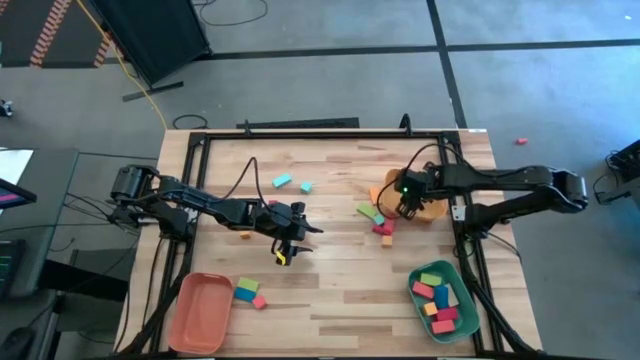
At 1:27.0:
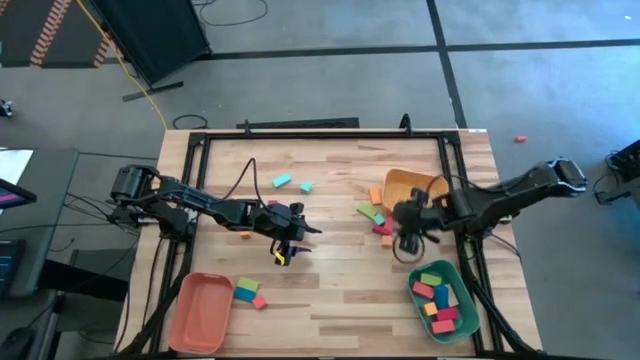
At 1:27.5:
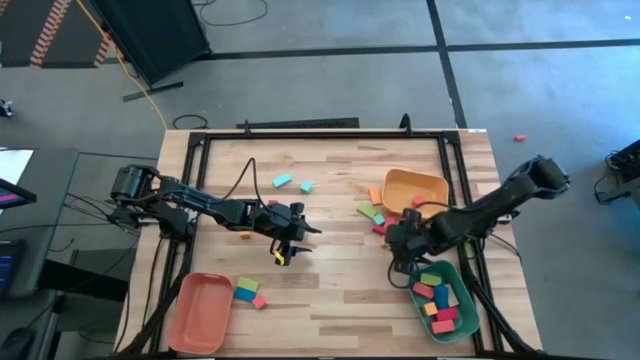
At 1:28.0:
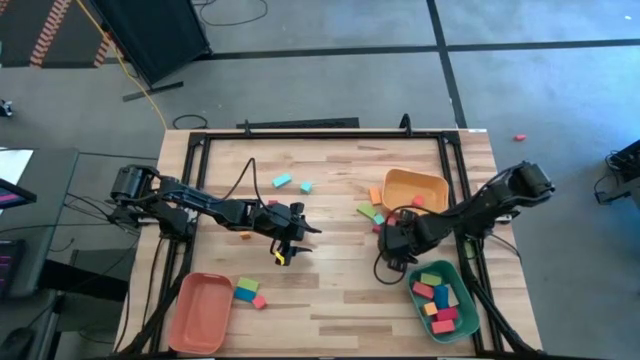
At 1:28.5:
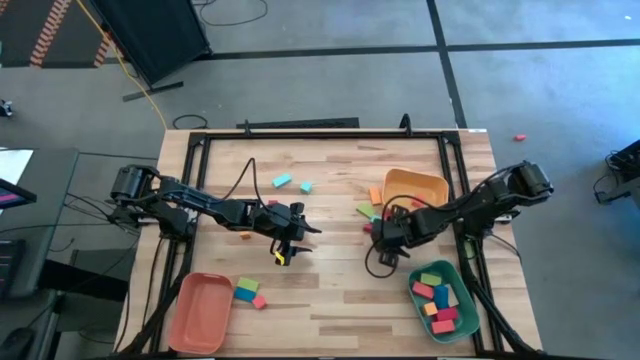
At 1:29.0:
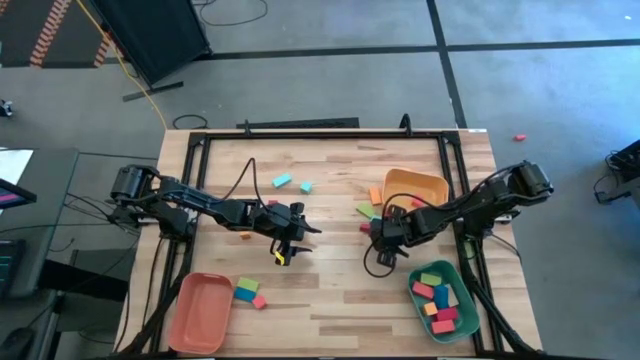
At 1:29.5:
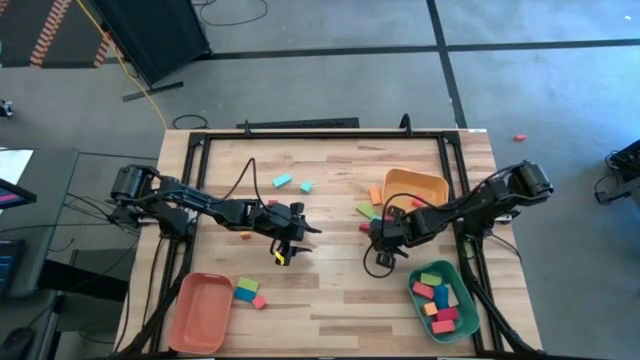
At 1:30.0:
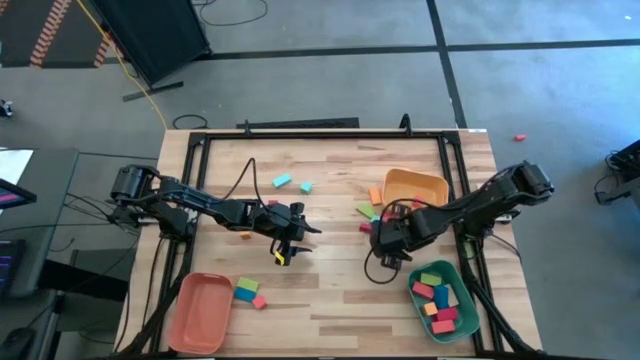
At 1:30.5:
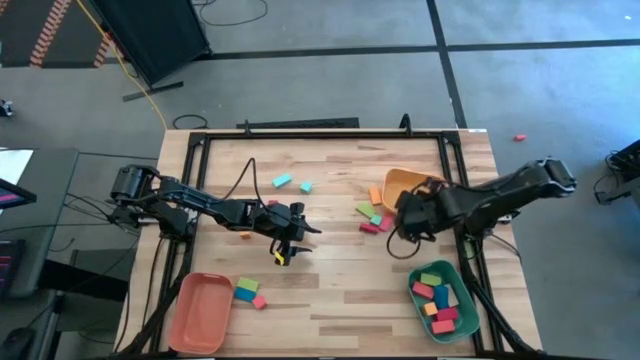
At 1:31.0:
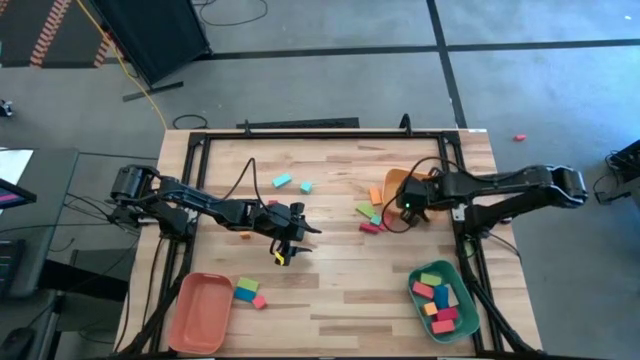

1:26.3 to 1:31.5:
Task: Sort blocks by size
Put the small yellow block into the yellow bin

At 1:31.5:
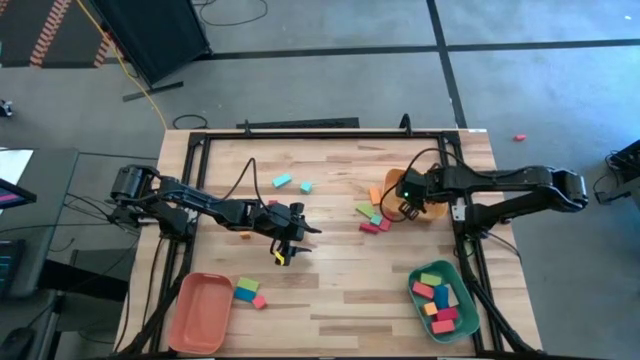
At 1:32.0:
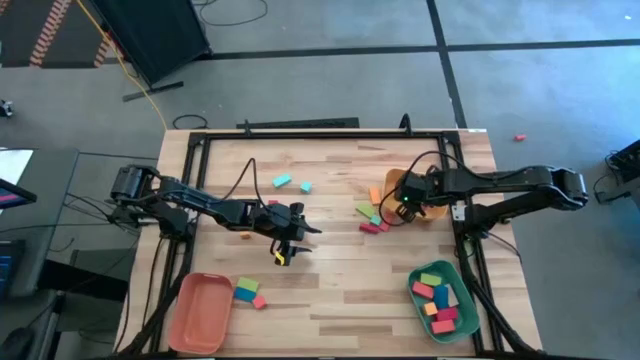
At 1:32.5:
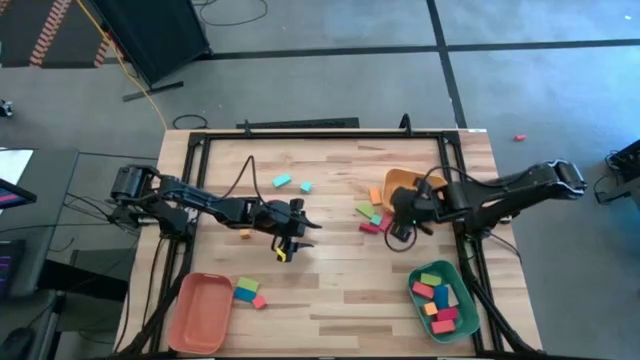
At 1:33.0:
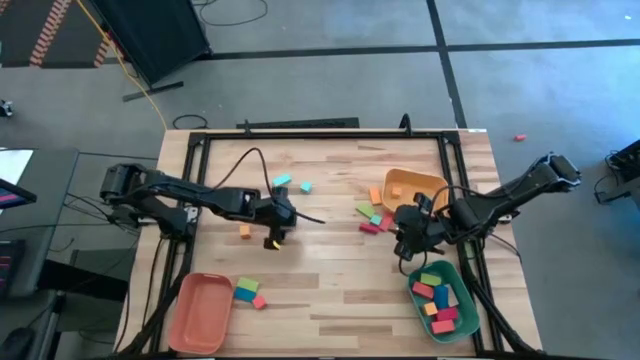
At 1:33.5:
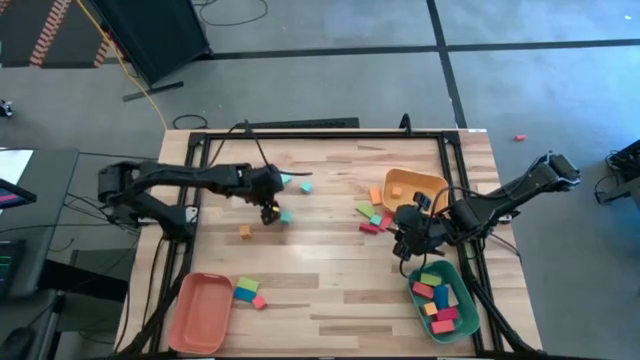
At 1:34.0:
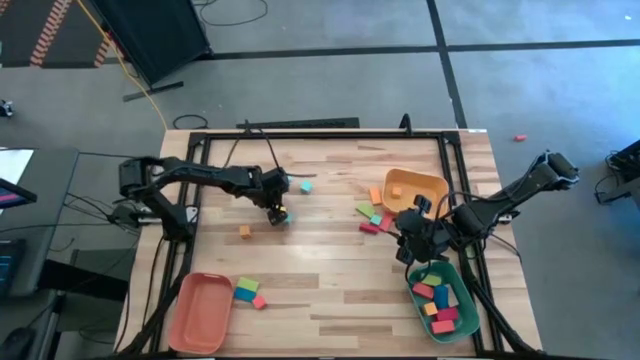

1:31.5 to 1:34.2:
Put the medium red block into the orange bin

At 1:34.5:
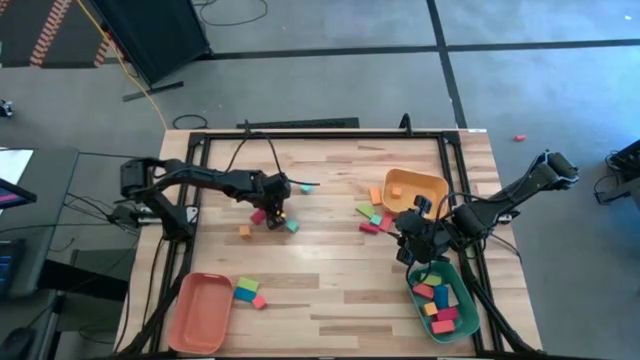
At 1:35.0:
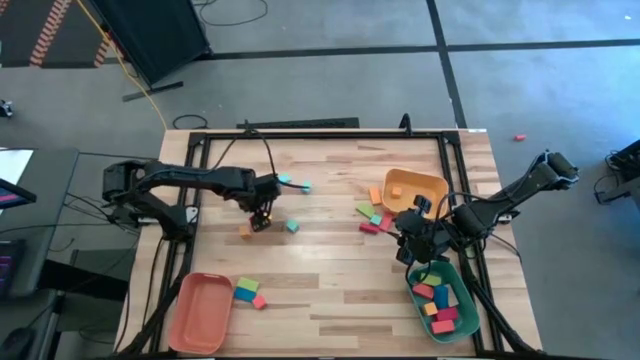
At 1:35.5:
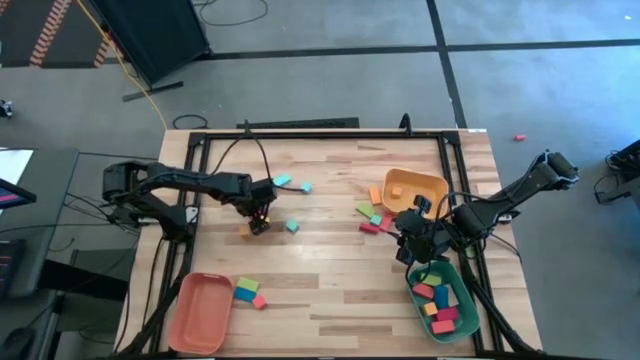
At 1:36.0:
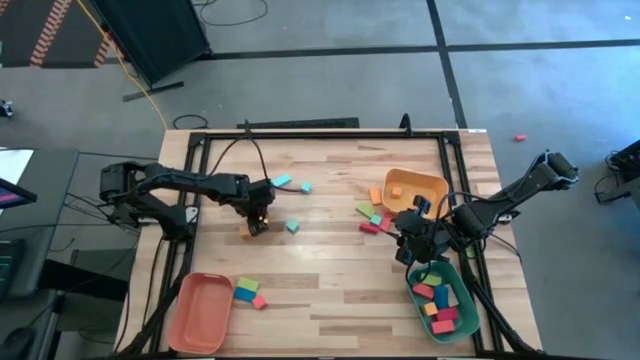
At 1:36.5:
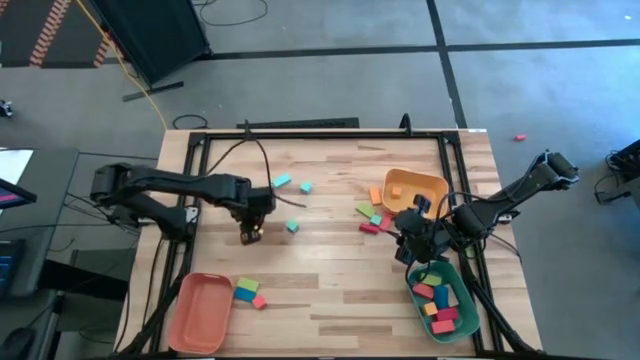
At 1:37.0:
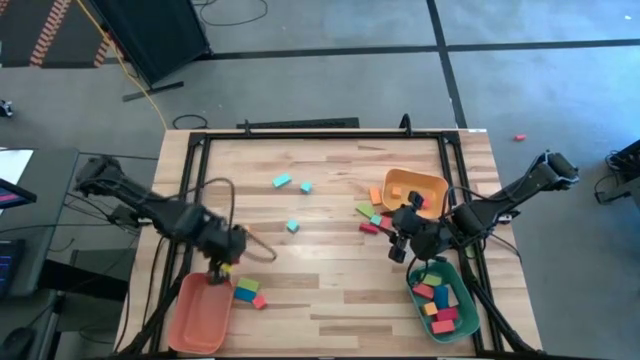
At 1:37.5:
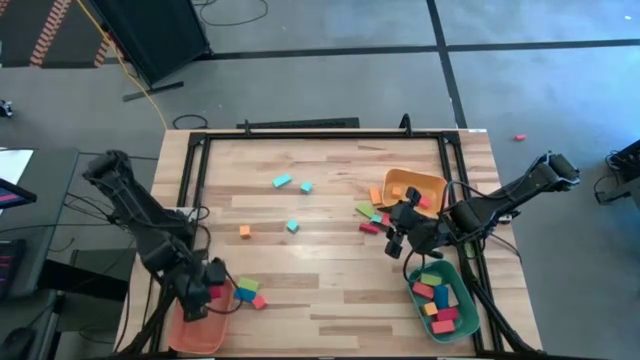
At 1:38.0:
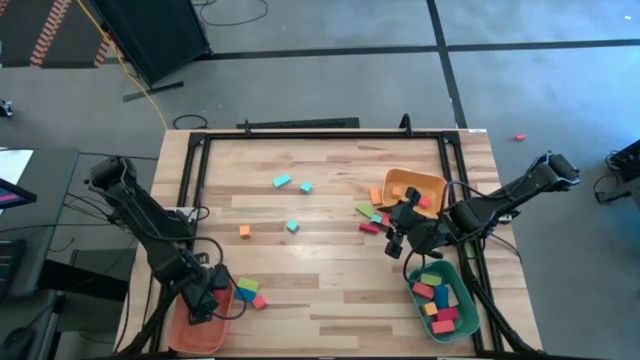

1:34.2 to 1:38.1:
Put the medium red block into the orange bin

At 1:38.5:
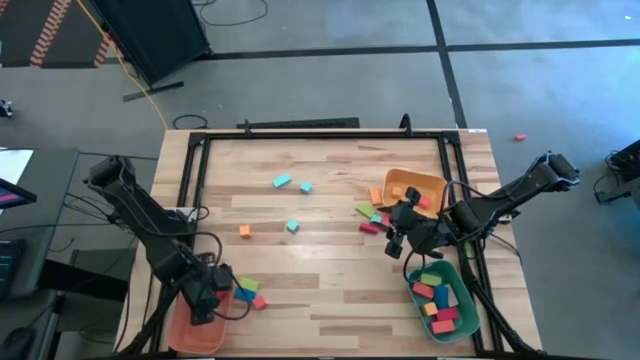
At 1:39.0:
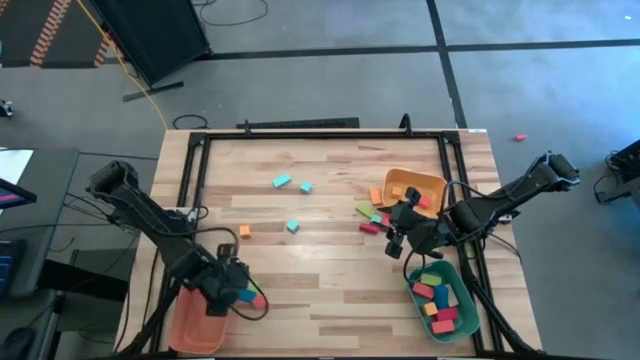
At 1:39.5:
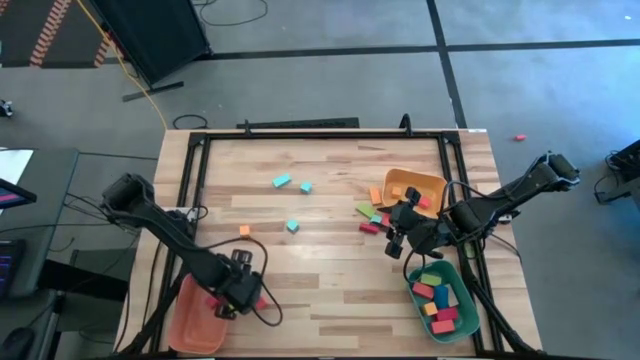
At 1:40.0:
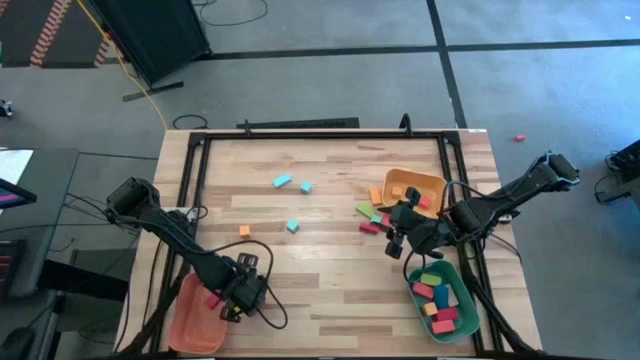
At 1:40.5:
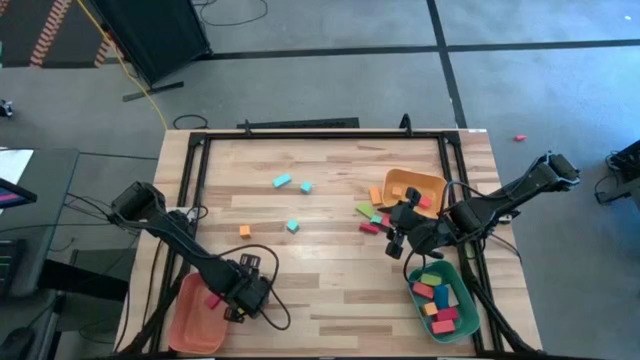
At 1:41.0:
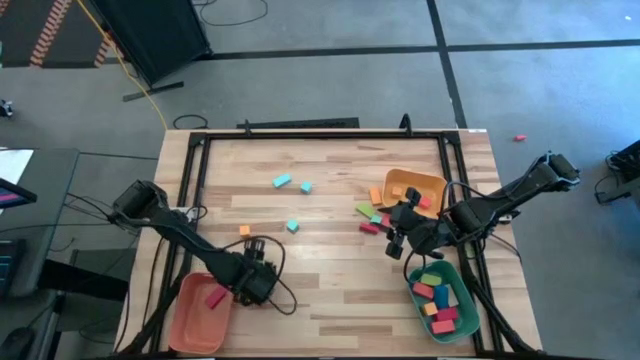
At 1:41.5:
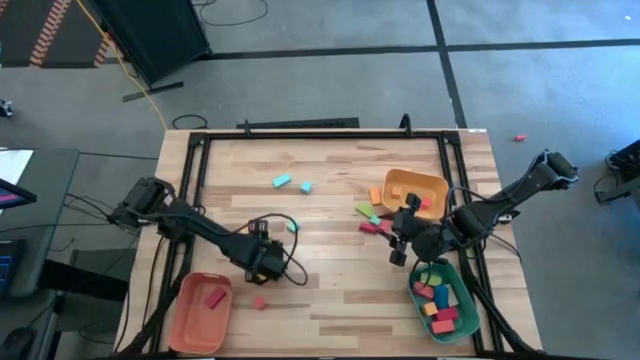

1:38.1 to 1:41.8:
Put the medium blue block into the orange bin

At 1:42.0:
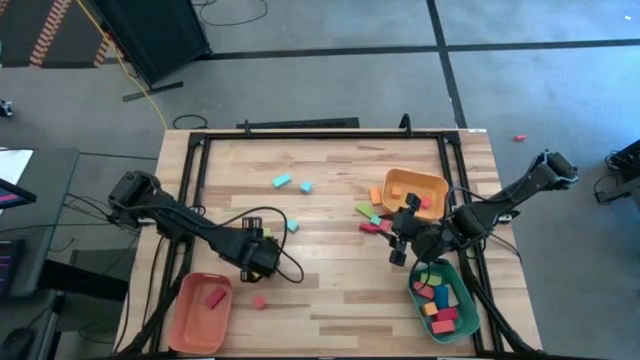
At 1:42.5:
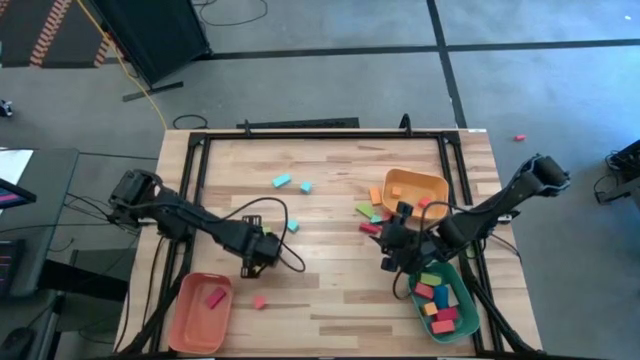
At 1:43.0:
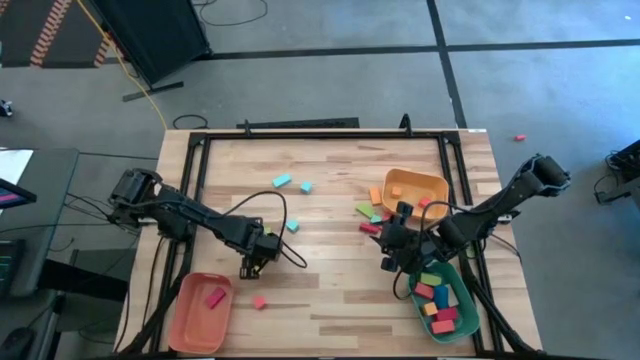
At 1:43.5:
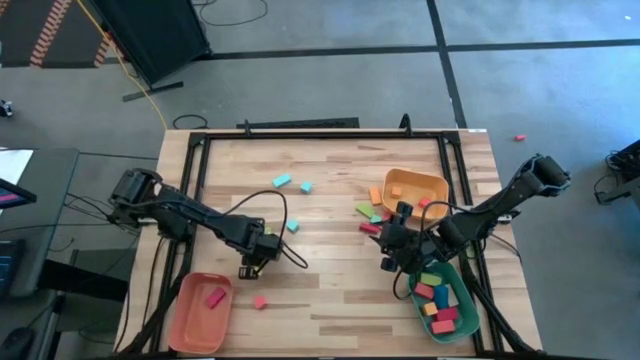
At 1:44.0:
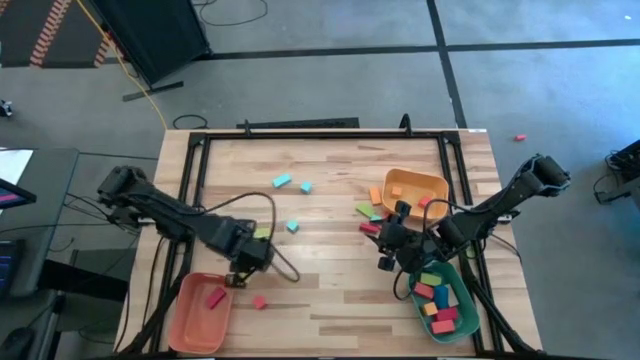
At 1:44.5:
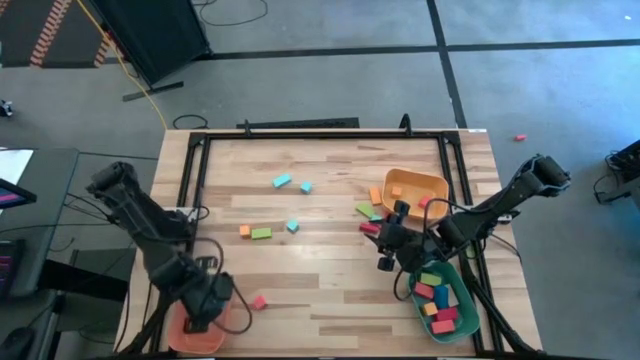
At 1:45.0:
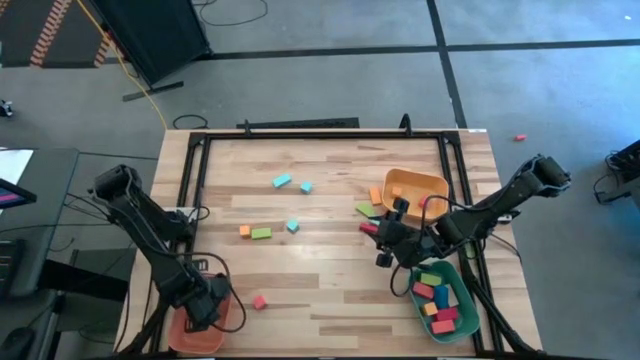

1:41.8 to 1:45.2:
Put the medium blue block into the orange bin

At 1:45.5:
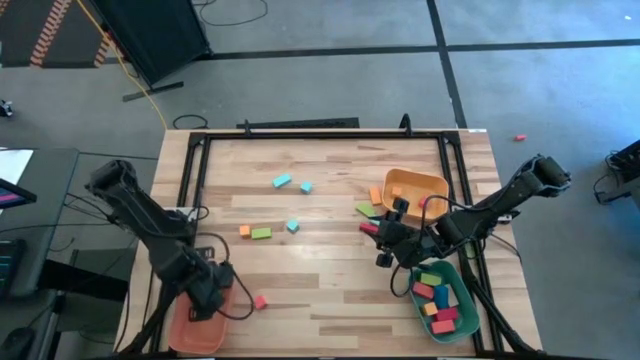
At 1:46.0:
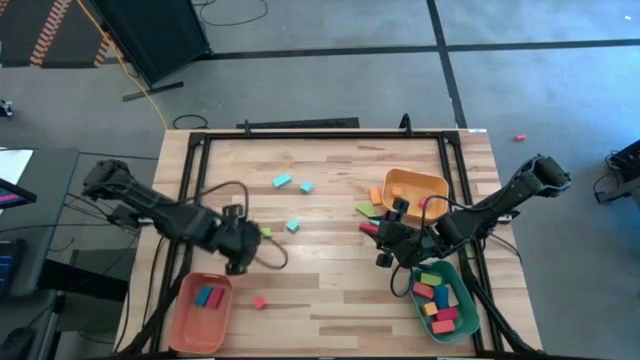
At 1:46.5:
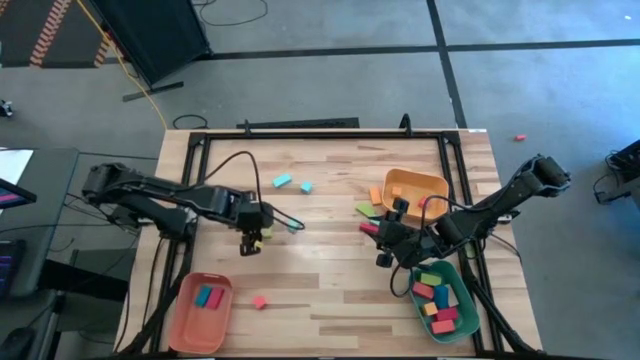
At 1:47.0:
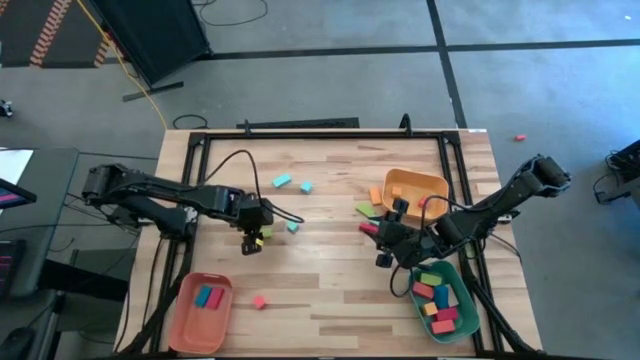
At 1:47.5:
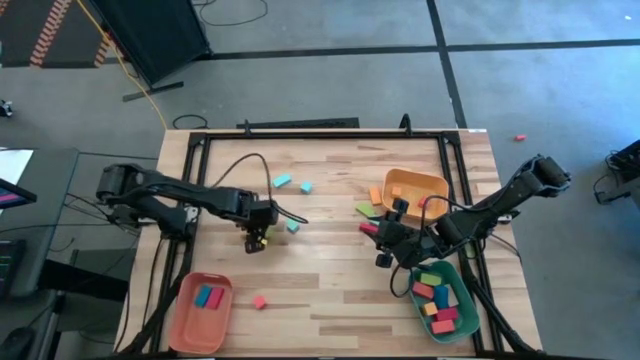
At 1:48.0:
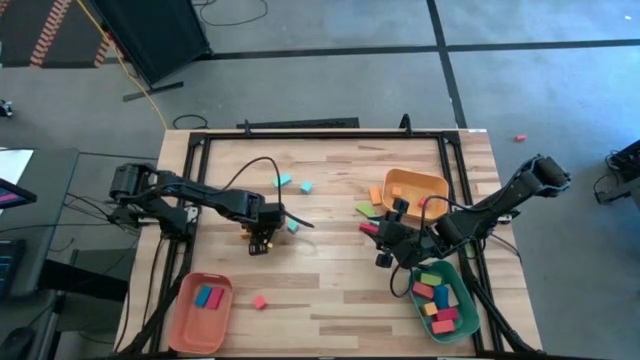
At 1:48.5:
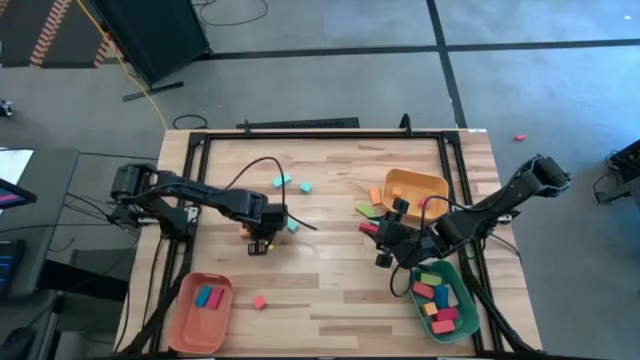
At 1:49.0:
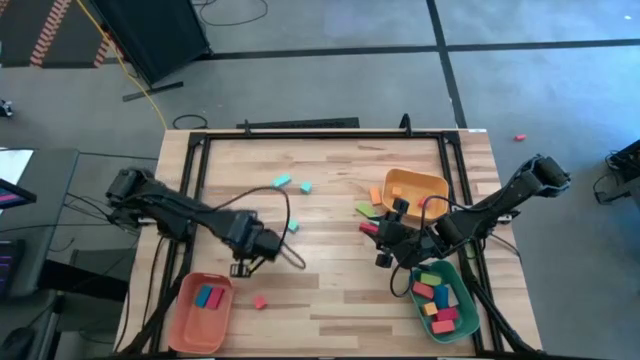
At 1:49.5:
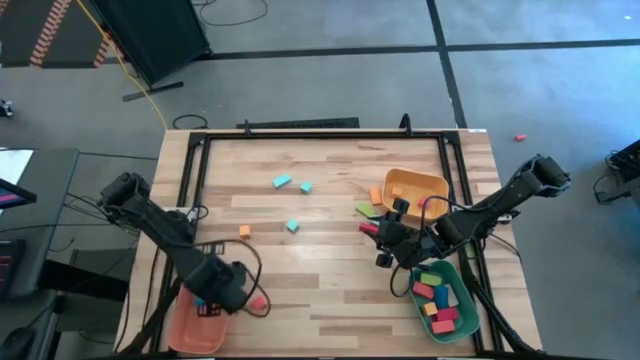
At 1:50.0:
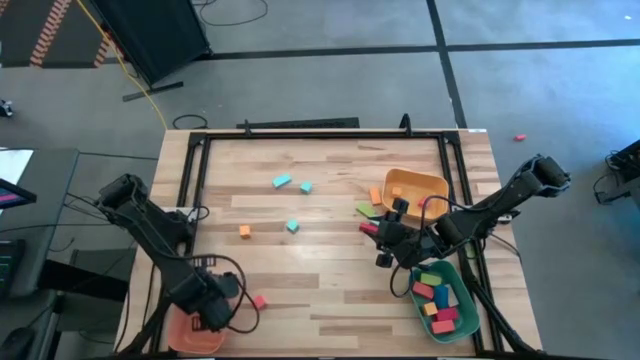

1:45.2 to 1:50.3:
Put the medium green block into the orange bin
